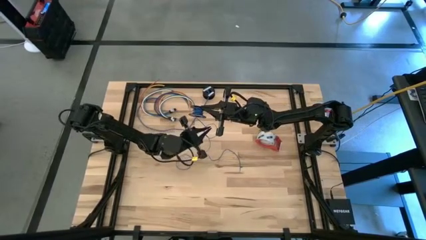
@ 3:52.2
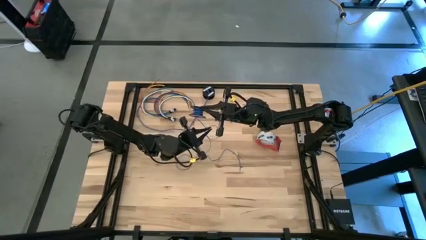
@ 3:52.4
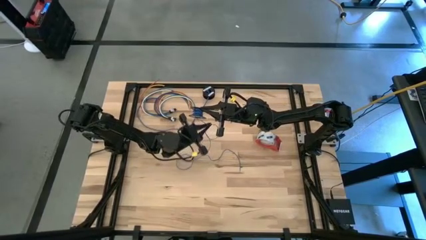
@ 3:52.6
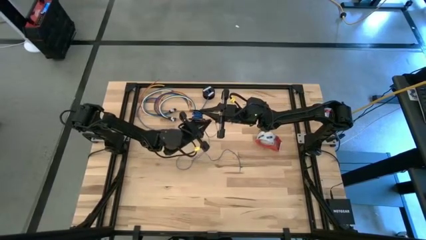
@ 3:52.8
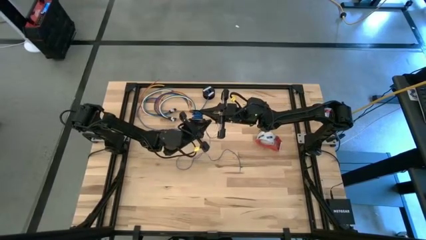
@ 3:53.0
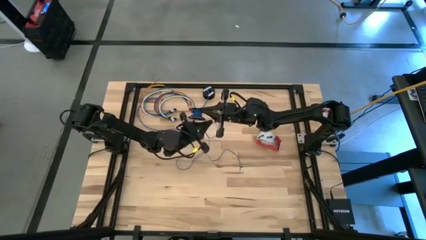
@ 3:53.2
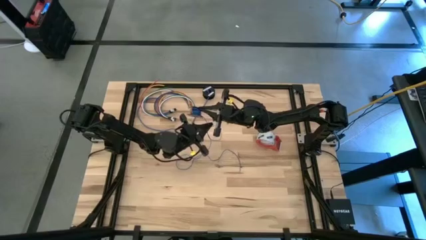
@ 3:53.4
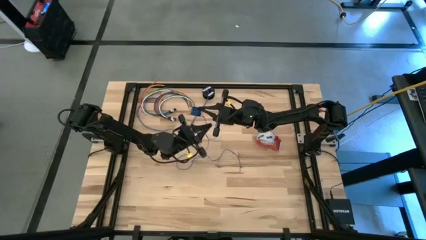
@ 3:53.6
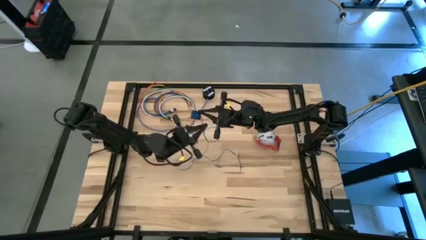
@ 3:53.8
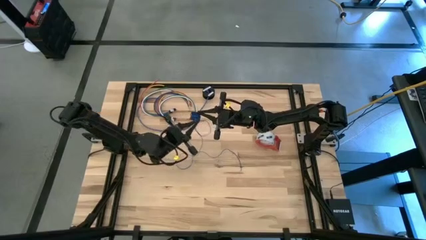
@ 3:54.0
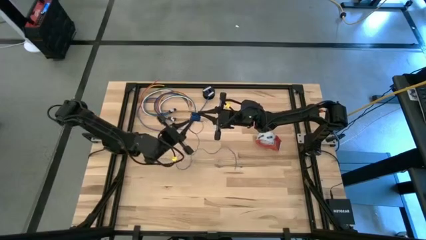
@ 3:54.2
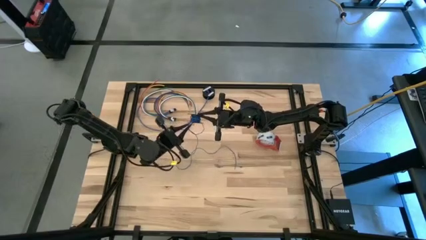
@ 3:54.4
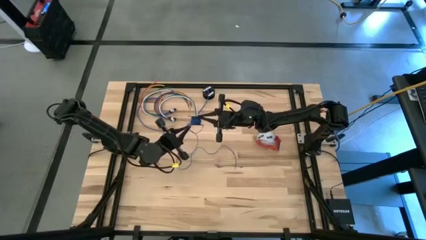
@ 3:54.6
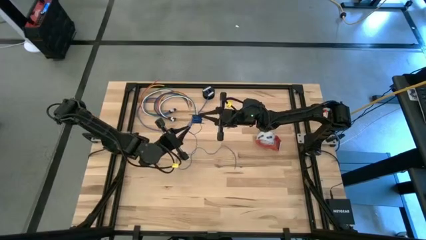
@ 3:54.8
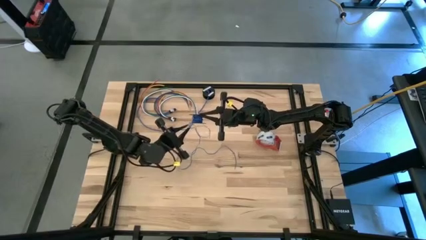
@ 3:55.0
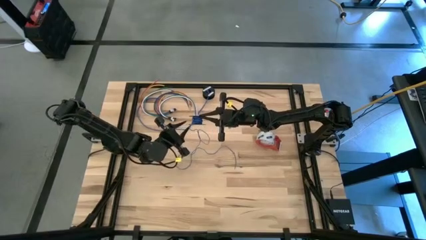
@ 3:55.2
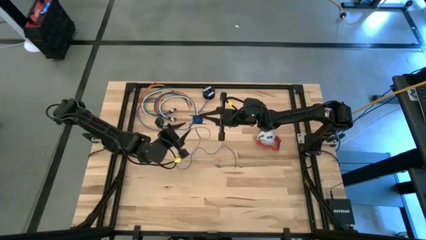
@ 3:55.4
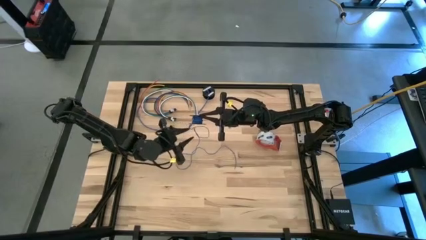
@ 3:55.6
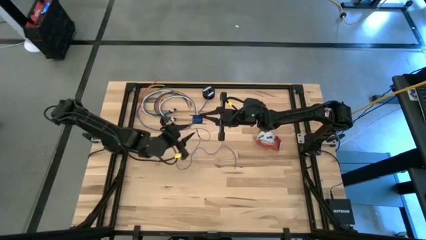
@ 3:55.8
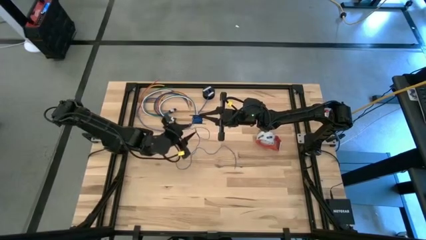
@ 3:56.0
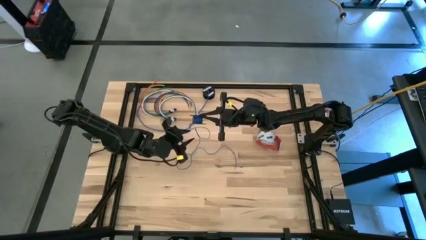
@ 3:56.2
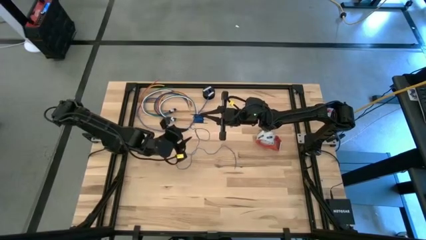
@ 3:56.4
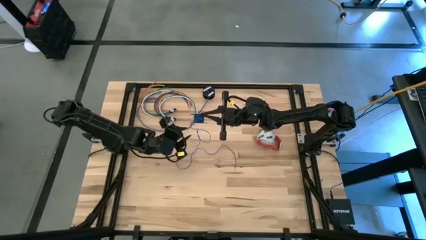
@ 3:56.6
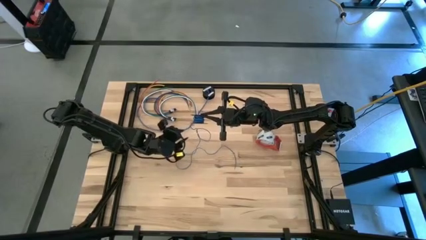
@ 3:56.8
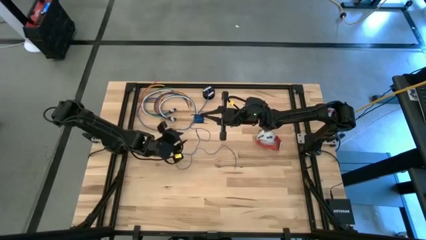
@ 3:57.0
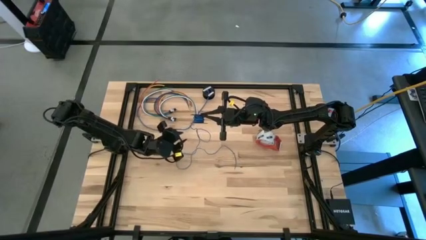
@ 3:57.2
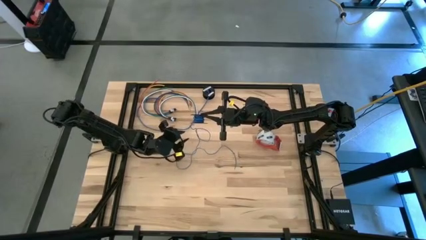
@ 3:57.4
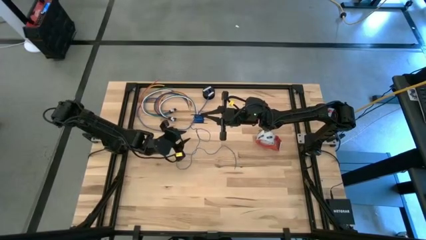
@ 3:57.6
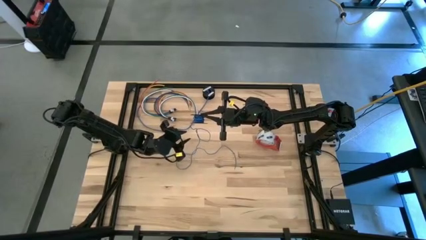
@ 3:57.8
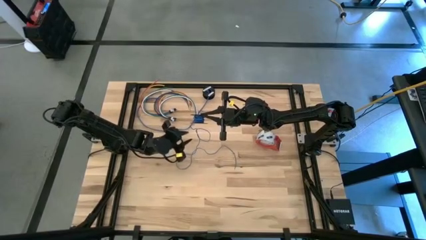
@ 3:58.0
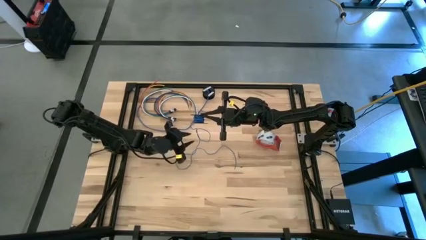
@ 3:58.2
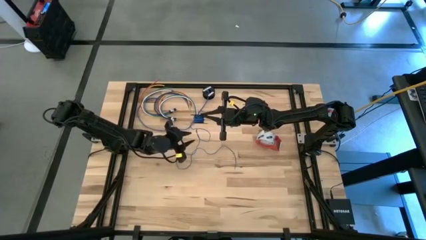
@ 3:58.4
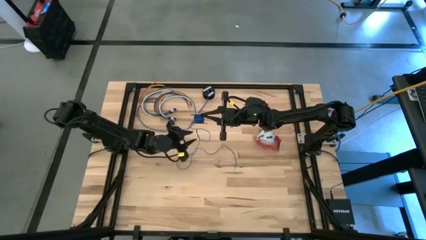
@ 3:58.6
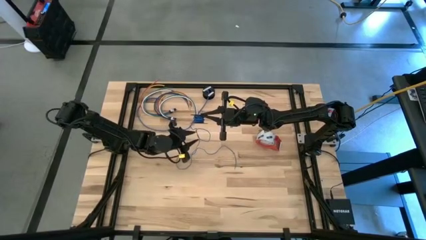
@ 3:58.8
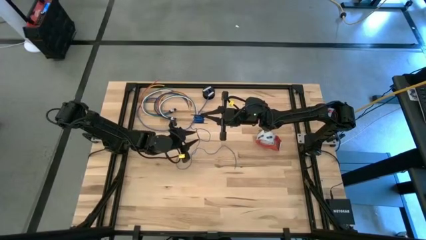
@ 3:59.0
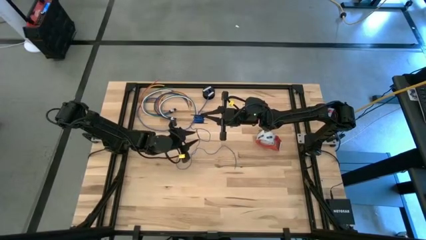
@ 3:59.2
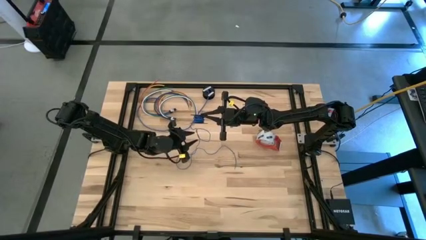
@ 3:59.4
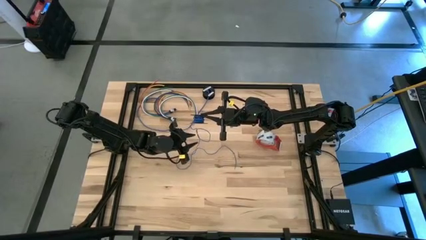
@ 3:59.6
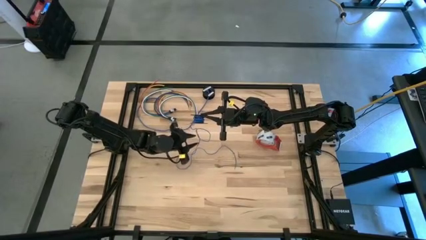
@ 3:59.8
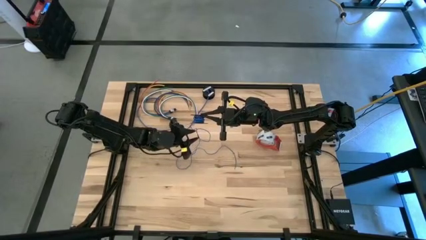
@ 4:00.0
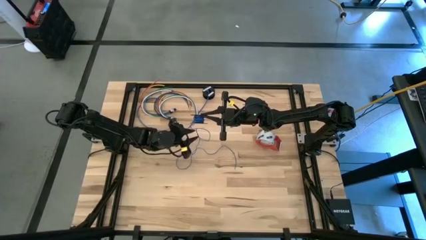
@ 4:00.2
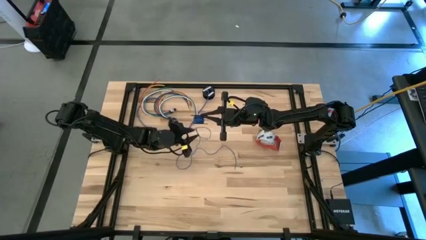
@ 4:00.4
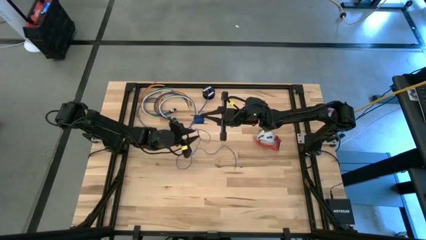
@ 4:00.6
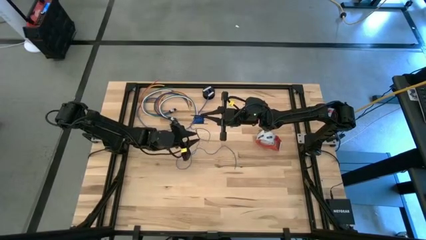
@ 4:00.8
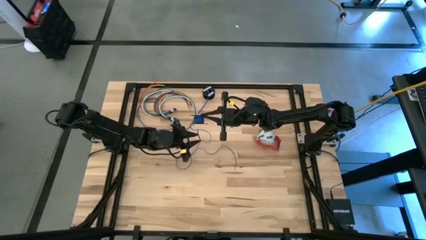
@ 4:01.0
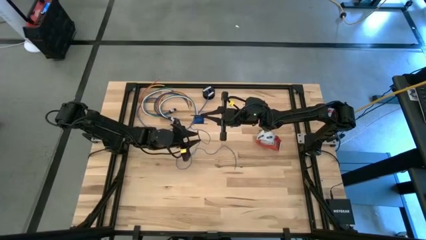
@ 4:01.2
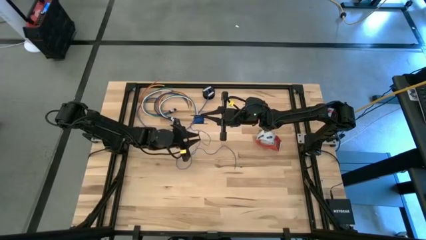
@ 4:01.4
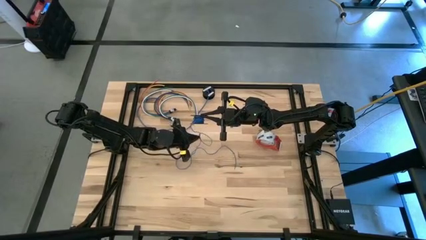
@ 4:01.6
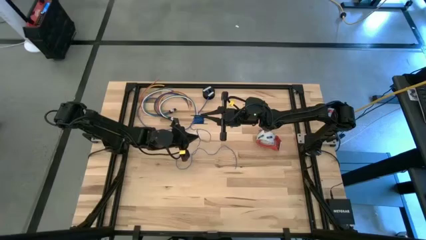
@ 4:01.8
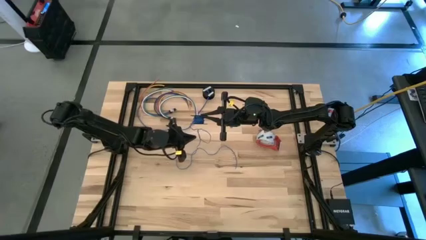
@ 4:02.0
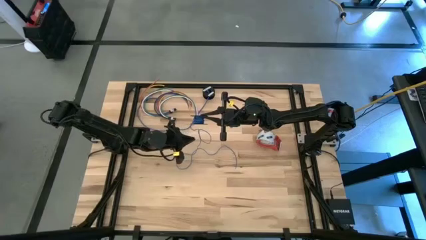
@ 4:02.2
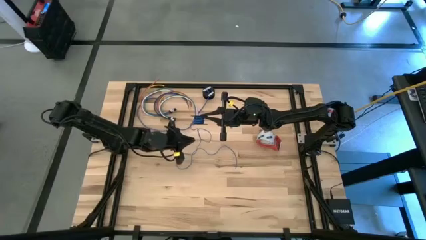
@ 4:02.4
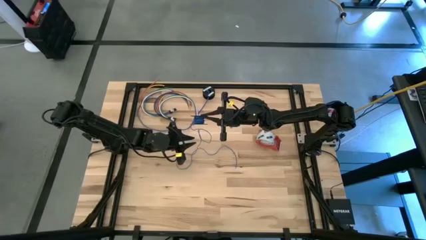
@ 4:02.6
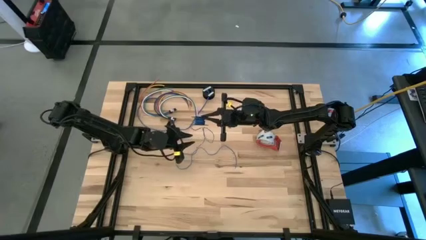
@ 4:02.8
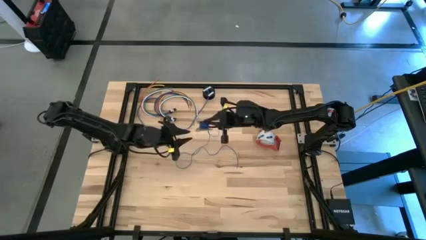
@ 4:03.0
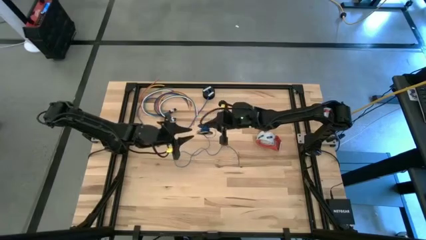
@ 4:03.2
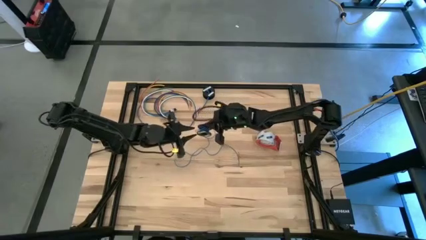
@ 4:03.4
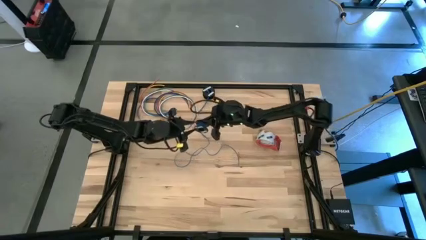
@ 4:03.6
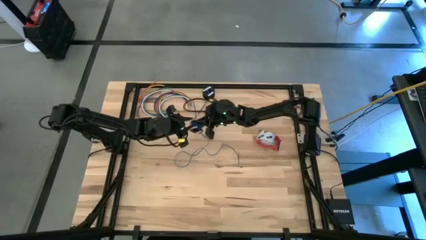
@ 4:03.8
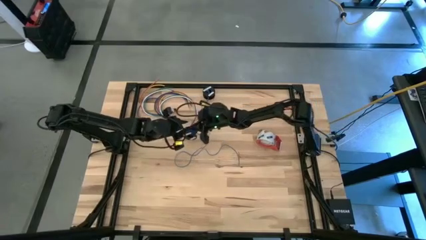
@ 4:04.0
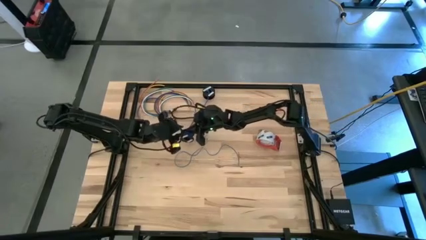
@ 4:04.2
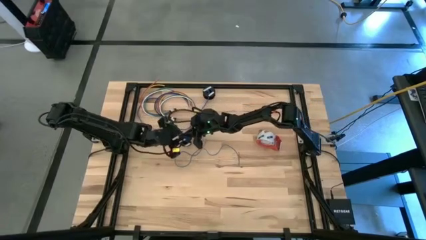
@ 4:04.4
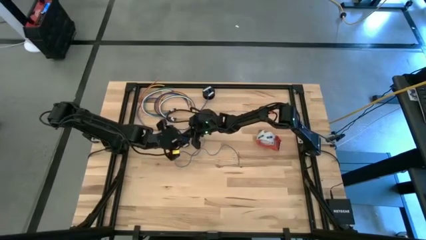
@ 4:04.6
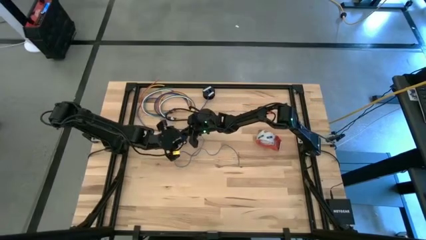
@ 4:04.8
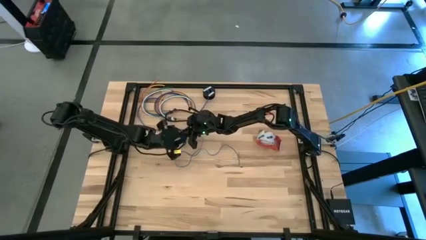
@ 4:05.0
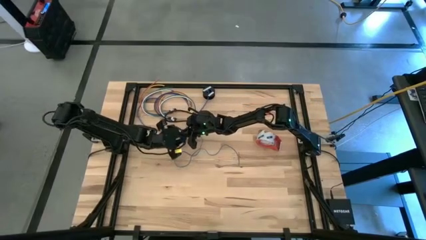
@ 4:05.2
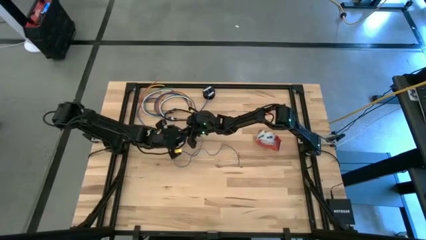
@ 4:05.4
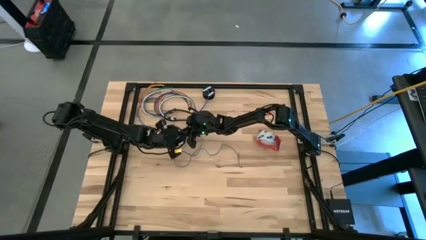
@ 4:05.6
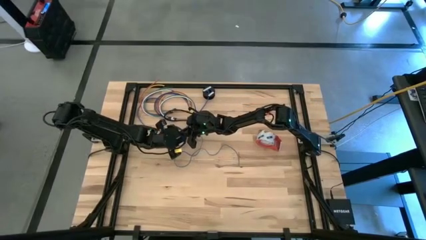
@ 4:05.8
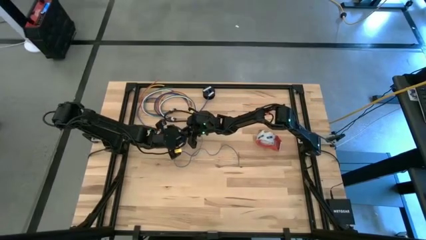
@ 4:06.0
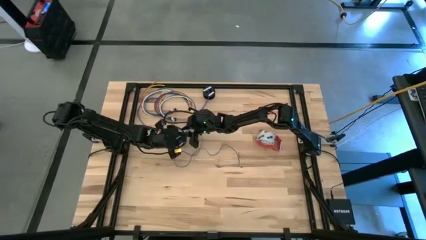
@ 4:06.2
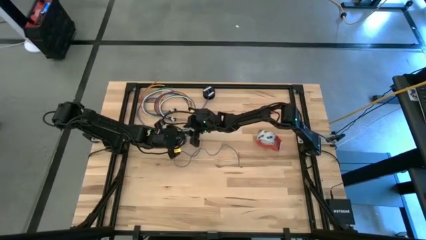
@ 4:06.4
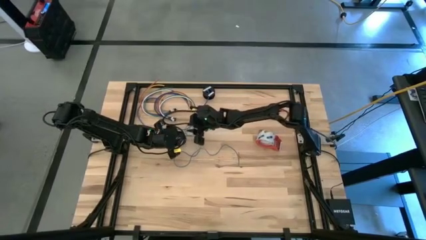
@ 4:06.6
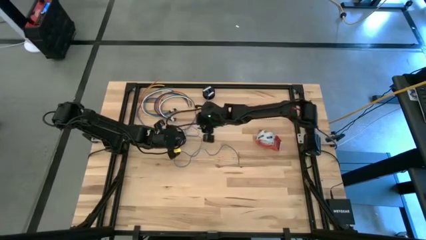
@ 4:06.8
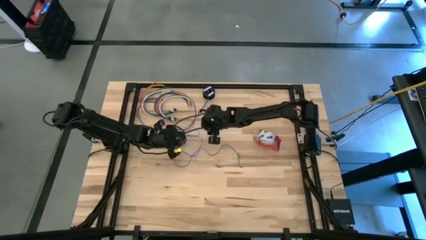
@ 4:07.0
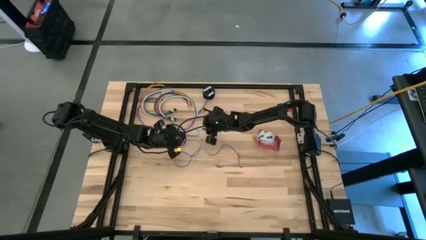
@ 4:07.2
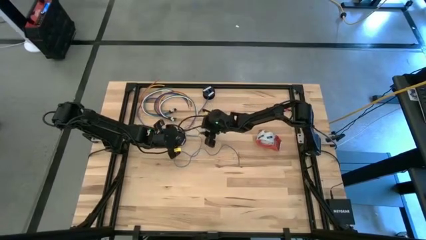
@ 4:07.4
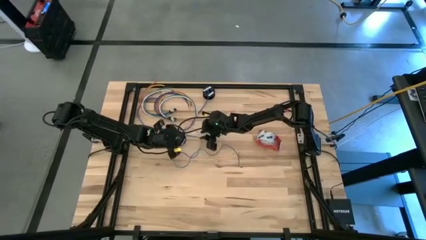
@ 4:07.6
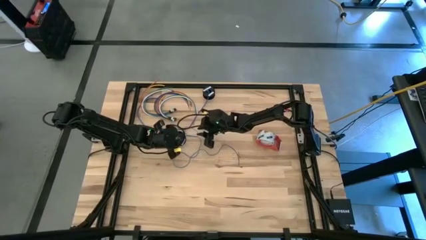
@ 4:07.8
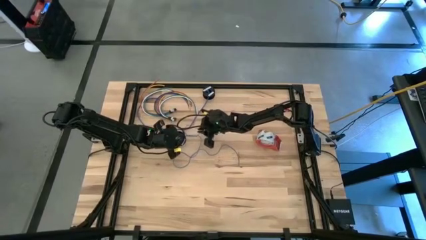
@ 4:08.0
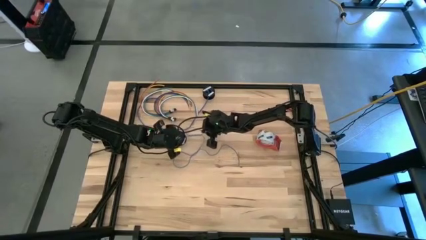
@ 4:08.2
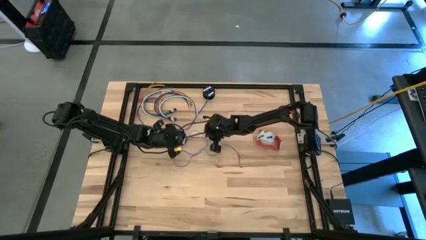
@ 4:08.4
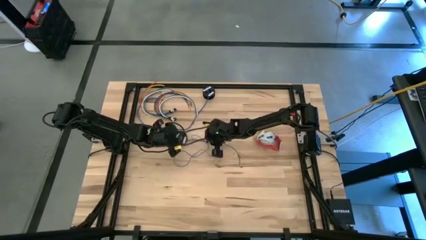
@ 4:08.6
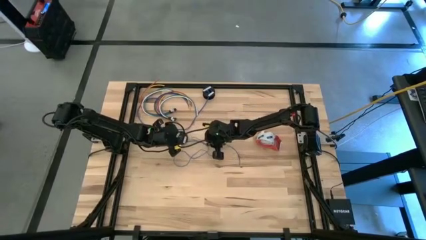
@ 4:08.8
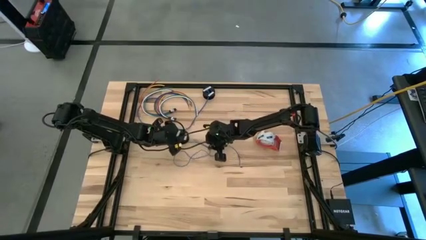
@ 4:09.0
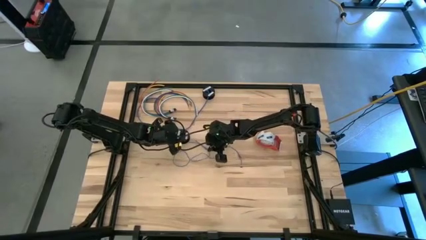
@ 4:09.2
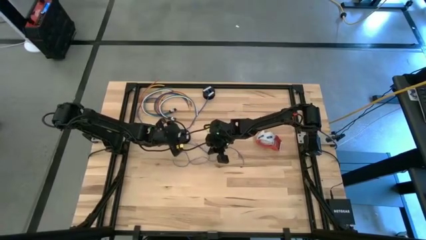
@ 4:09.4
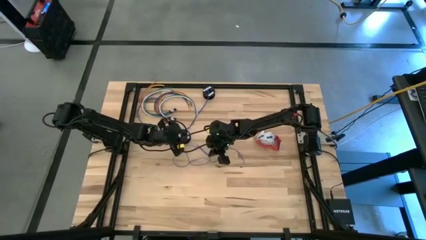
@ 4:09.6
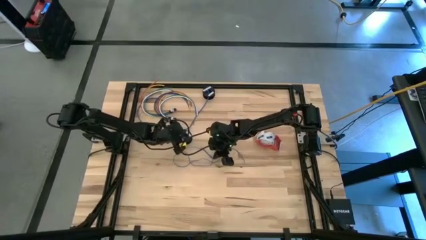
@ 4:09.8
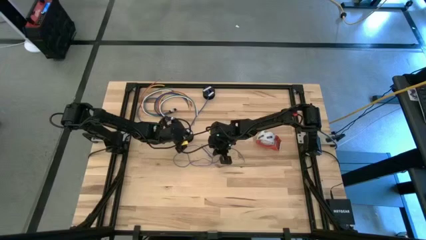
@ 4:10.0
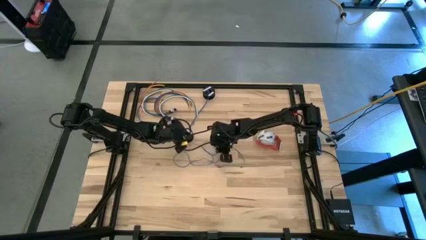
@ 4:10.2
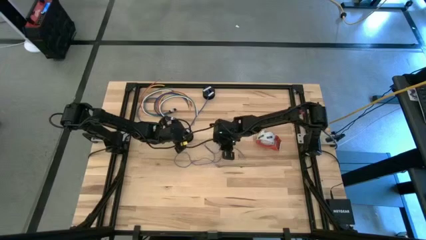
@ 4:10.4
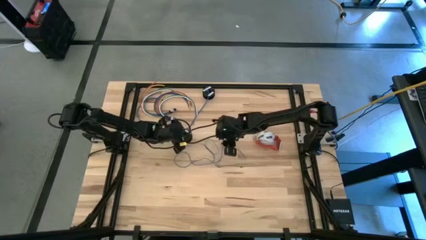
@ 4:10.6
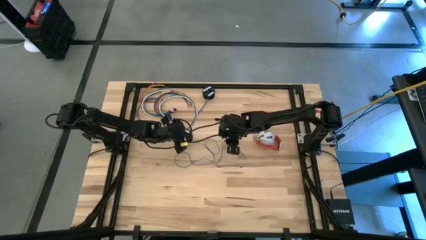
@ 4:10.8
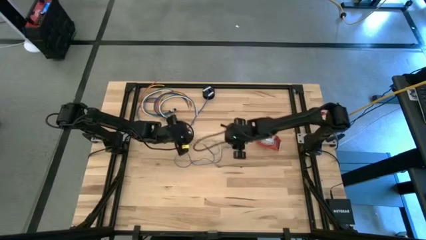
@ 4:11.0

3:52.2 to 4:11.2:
Task: Coil cords
Coil the blue wire onto the spool
